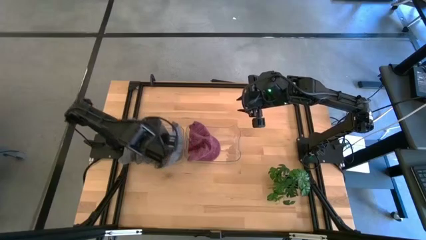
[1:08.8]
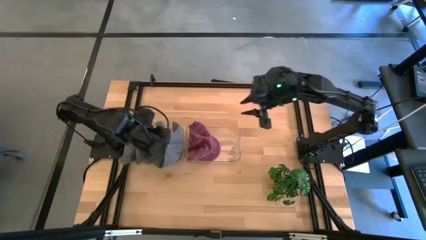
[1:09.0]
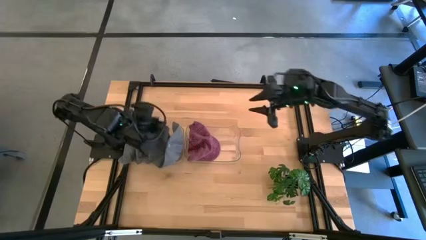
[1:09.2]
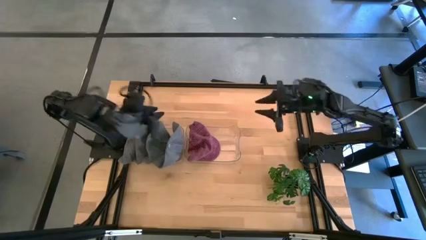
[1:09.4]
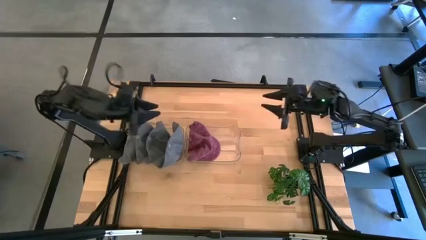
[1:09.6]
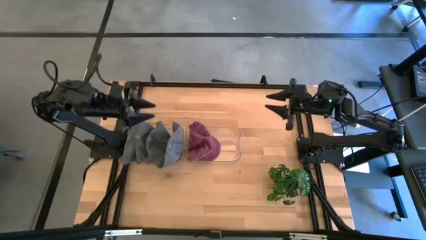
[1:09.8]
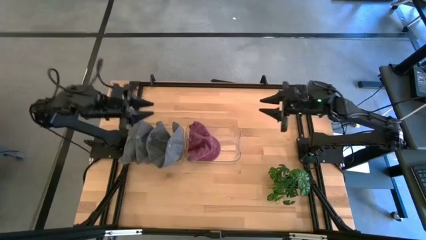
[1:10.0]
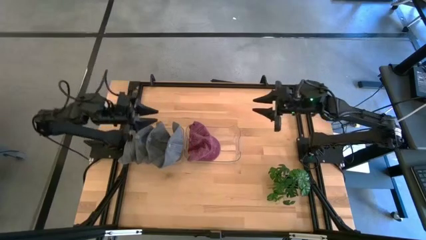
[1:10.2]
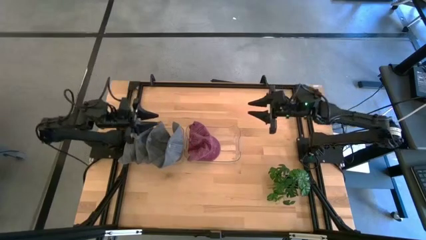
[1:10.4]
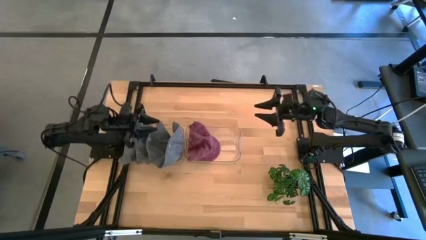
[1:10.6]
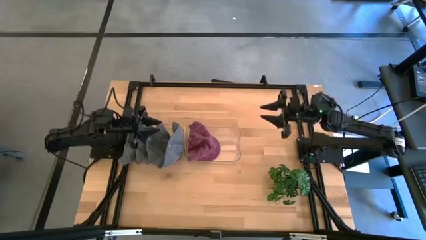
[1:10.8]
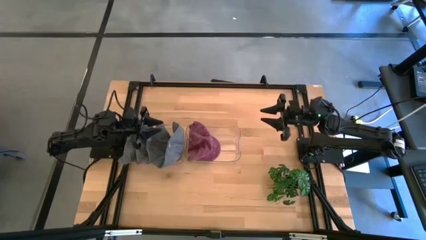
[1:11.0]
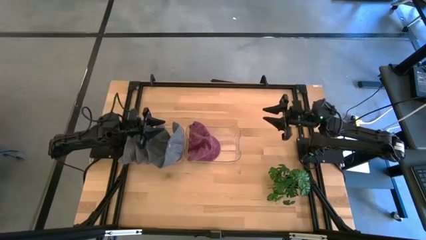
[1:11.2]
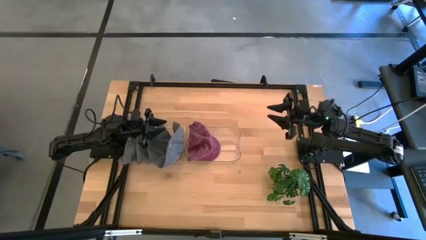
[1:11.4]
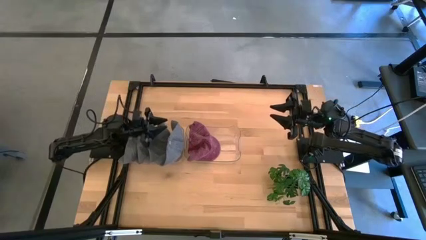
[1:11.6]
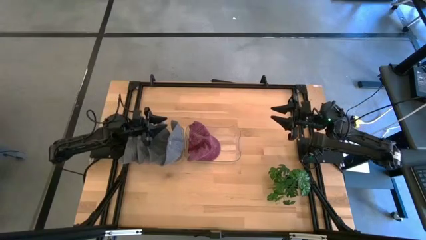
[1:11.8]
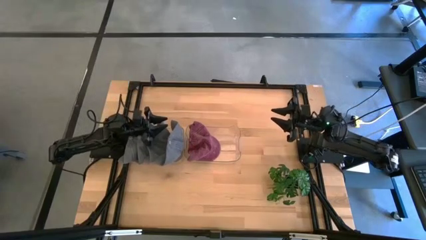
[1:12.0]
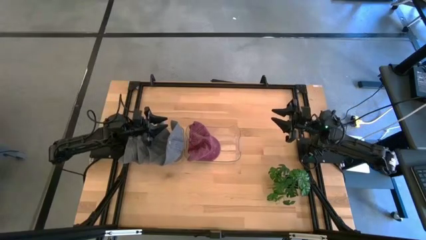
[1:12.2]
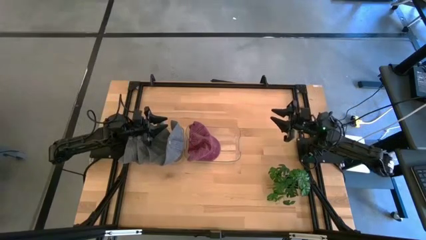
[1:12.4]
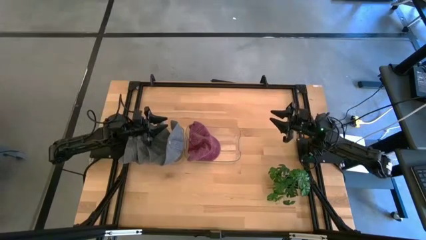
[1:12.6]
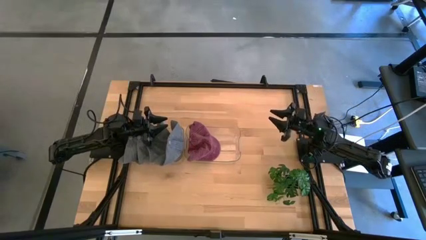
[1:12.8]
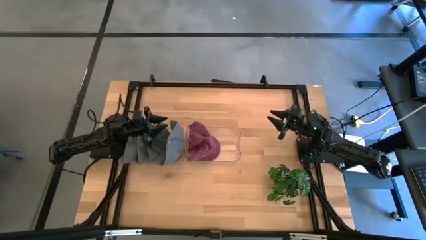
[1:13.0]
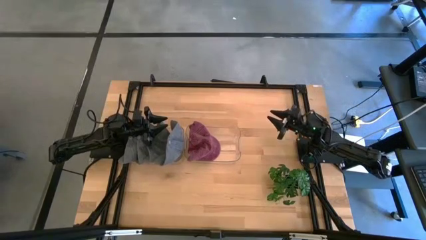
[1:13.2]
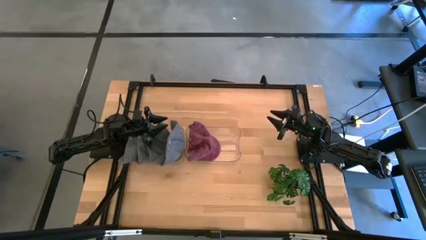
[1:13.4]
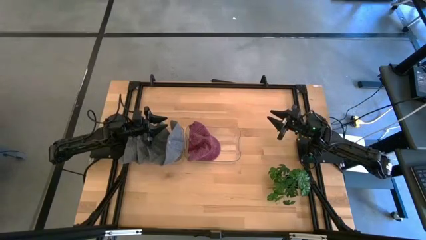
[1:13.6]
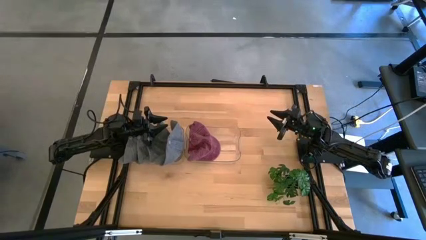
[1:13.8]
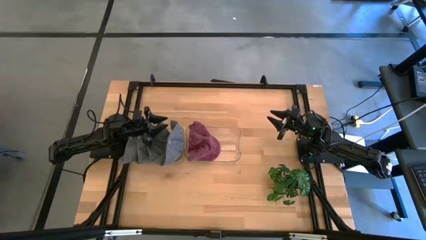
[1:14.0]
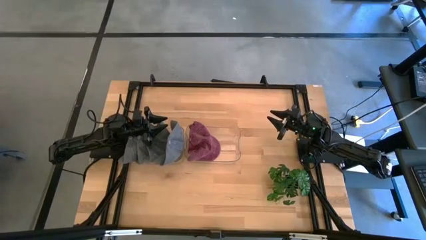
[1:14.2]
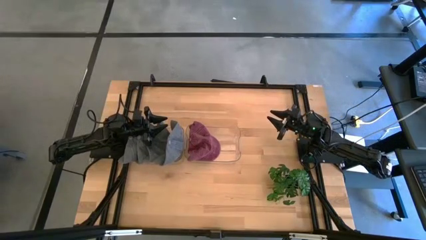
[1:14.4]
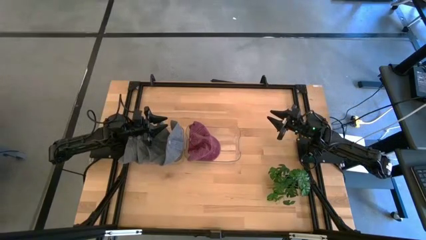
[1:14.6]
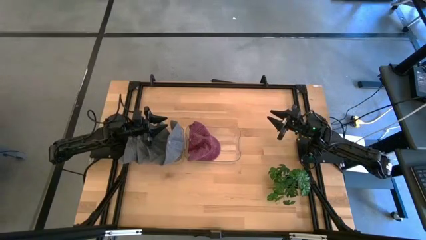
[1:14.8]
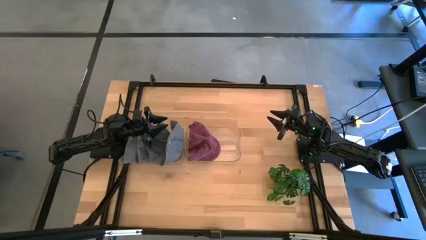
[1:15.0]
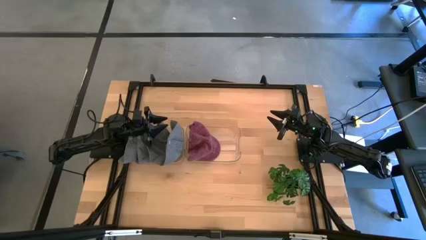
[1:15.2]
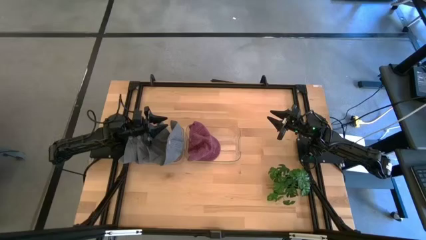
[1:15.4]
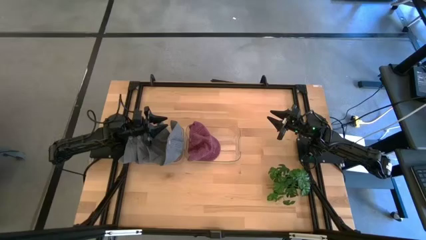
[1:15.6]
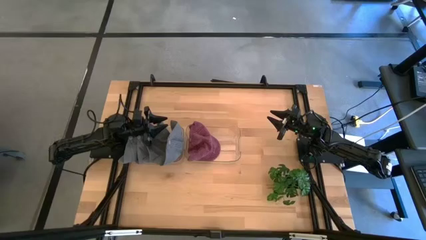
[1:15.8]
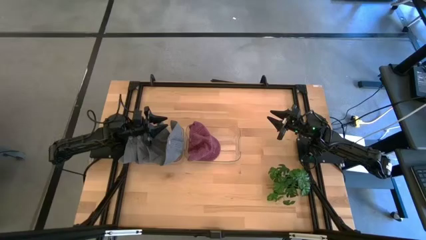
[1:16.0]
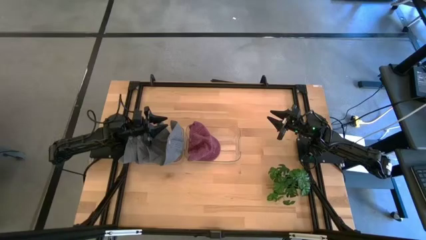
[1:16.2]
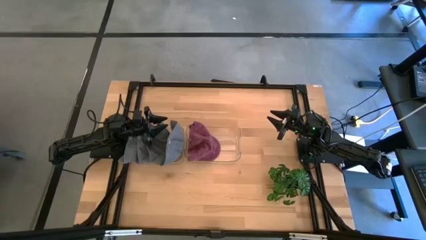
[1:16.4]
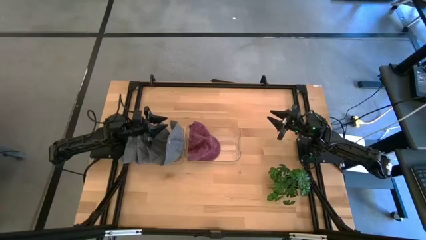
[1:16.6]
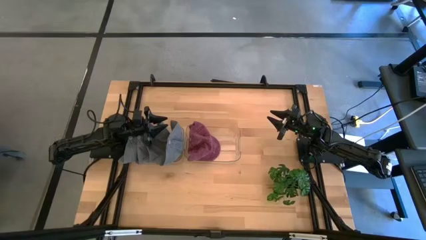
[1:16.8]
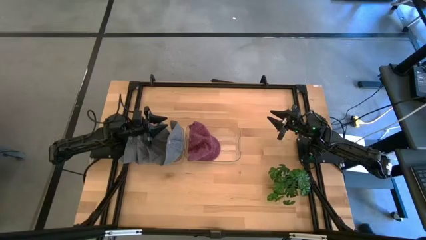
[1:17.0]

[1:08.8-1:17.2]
Task: Pick & Place hat
Return To Home Position

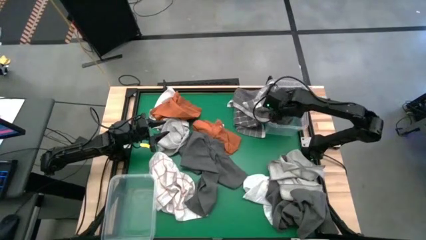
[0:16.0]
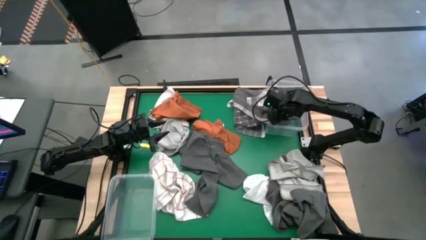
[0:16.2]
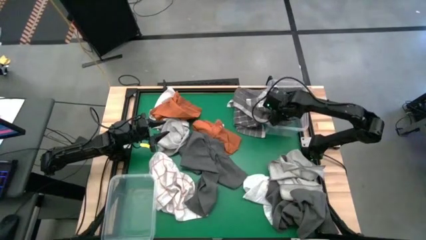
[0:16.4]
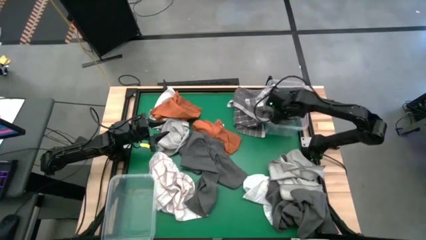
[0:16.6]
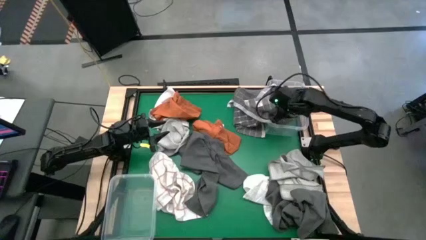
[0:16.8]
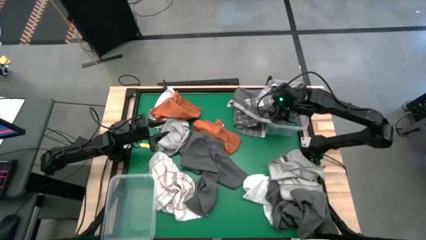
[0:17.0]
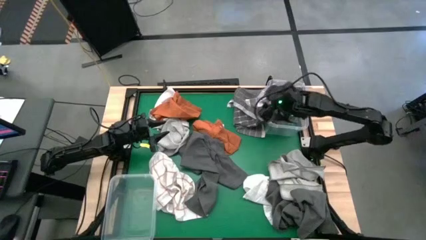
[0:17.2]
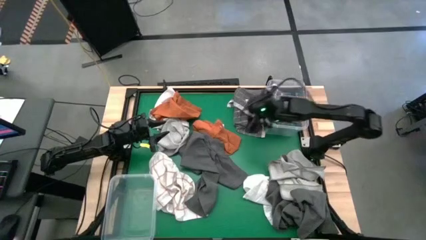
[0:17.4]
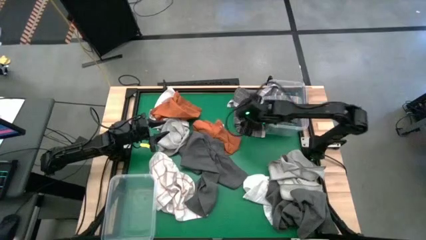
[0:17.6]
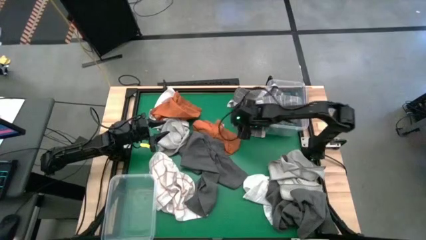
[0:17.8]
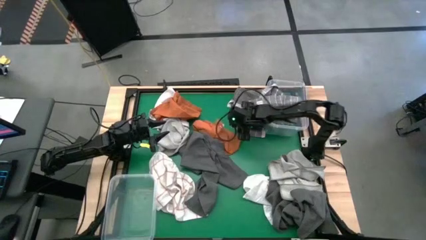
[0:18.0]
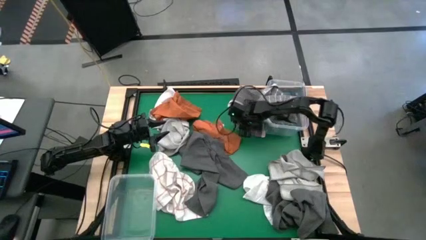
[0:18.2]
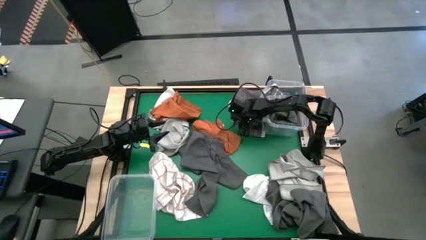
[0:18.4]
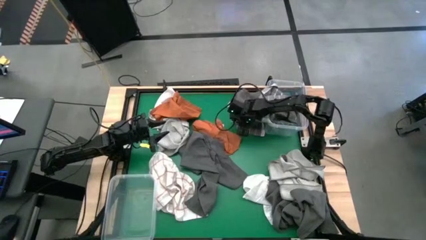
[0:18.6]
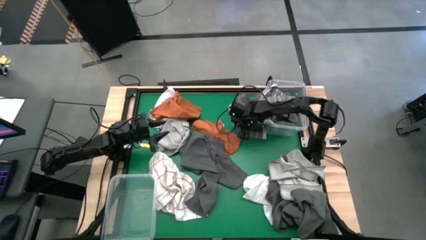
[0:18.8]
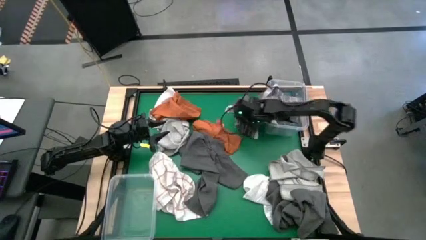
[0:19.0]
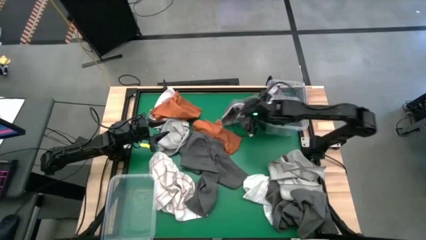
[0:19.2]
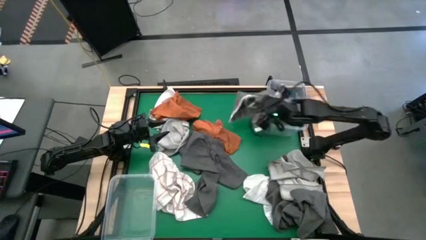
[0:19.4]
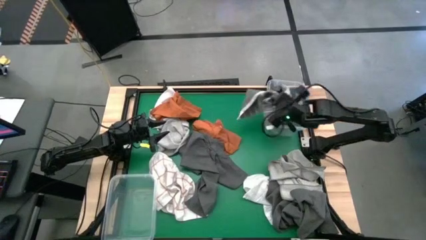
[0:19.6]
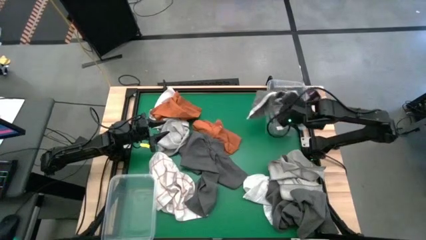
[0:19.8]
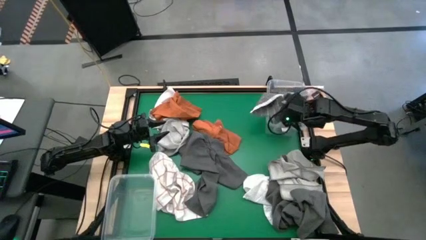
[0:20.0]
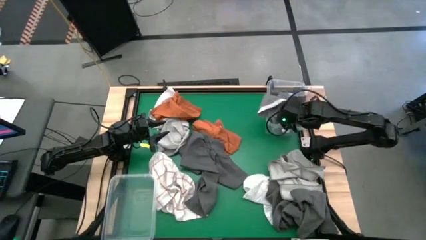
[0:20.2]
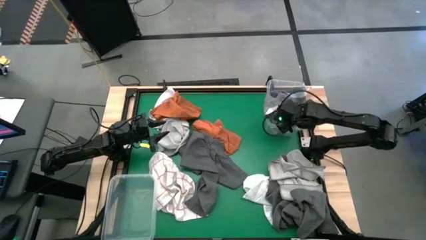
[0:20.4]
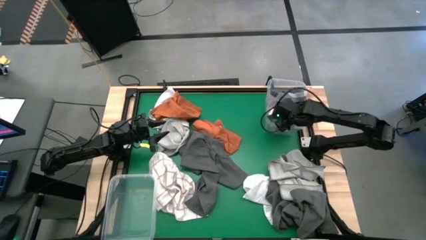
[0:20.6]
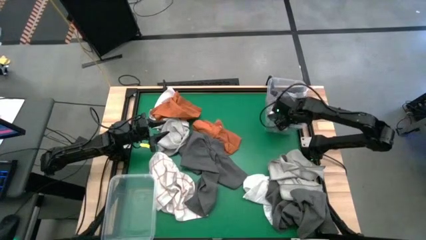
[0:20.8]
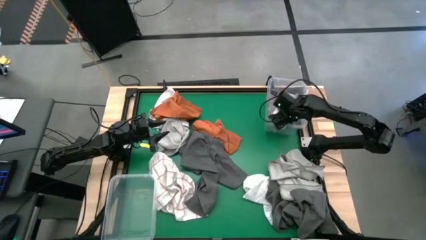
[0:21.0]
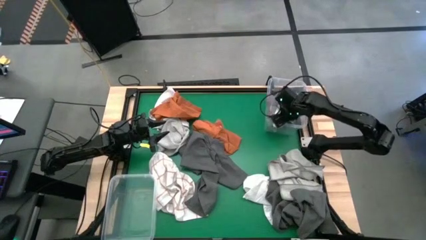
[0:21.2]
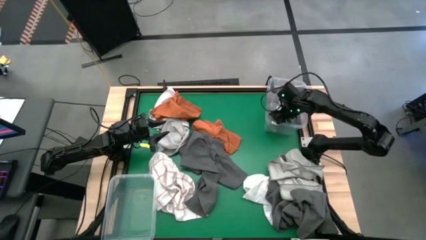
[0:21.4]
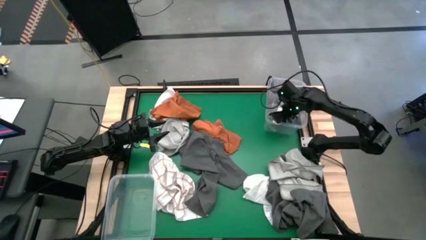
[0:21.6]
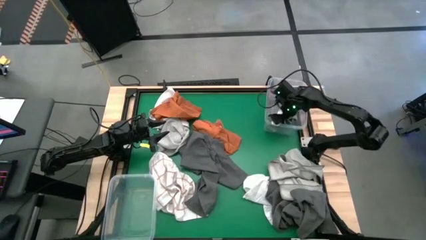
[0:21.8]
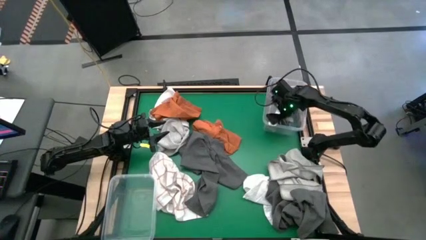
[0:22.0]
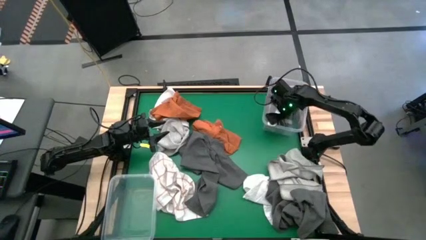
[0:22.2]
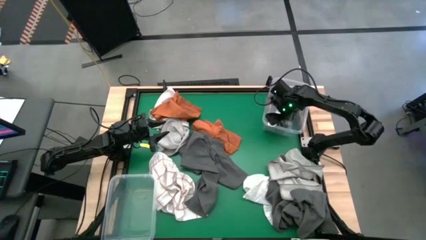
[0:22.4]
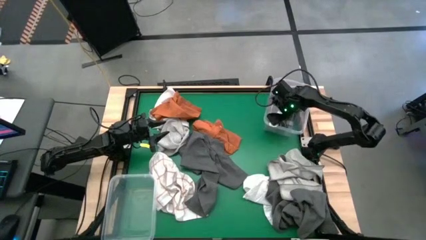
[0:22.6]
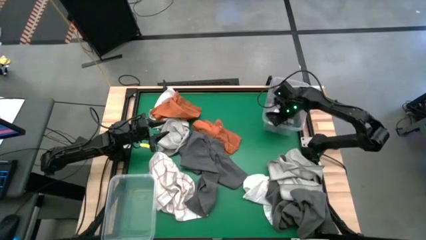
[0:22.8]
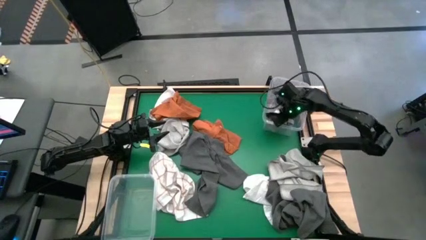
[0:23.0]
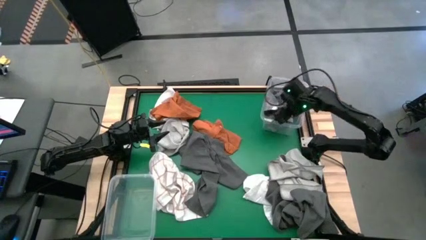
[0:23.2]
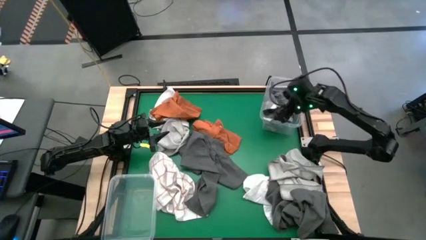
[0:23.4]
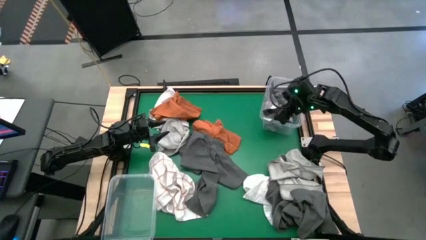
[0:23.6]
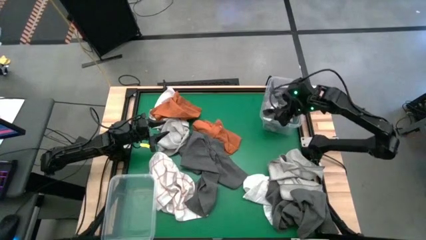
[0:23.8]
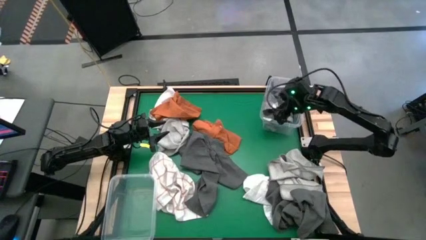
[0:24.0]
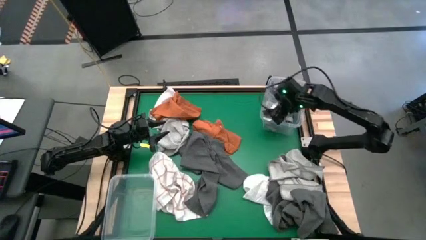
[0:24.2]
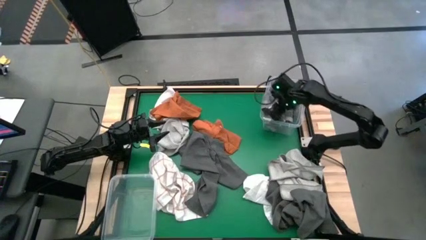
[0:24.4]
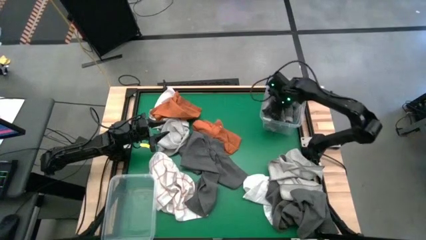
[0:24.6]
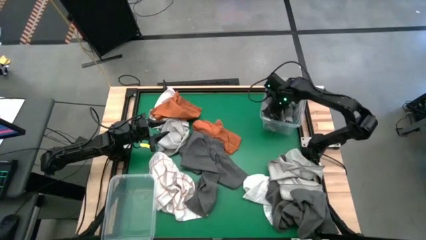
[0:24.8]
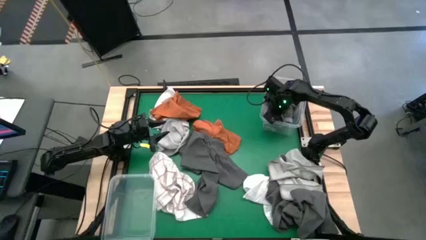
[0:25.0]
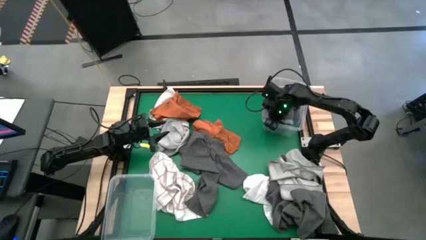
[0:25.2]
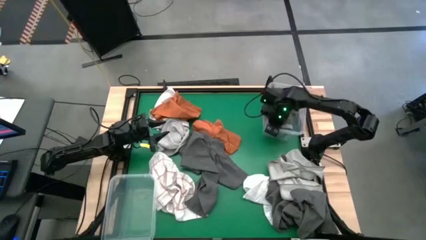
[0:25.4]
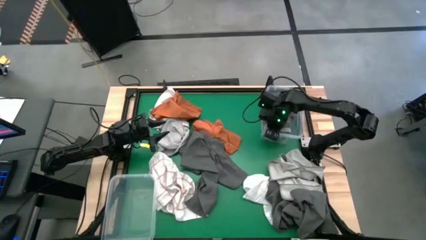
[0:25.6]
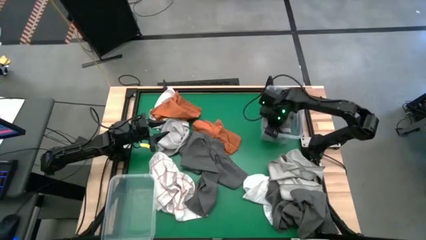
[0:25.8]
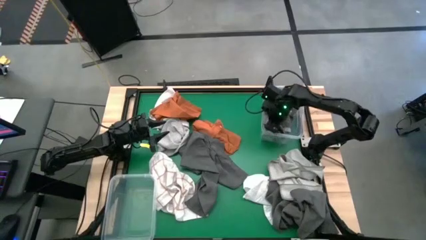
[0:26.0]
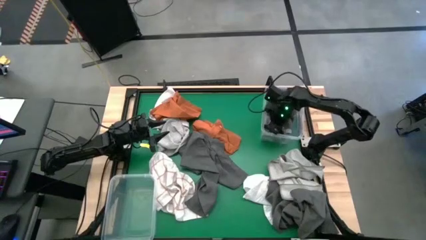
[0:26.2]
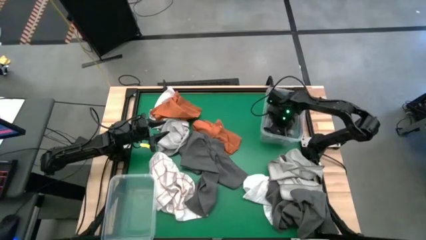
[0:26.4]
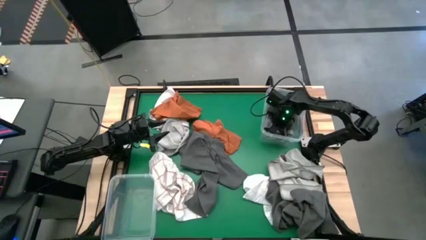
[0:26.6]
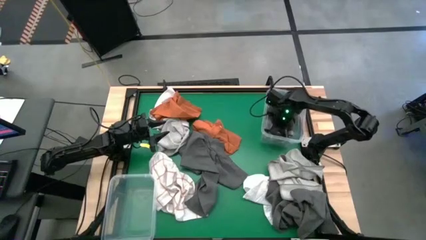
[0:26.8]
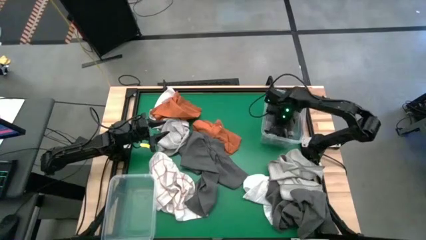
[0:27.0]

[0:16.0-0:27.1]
Task: Sort towels by color in basket
Put the dark gray striped microfiber towel into the top transparent bin
